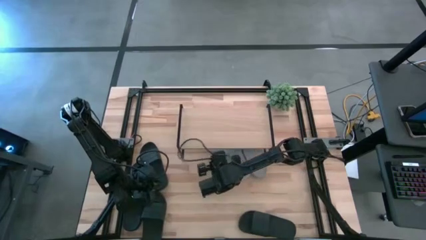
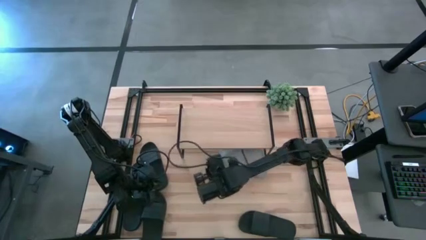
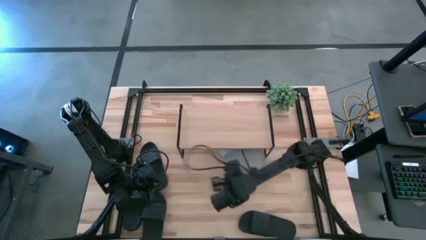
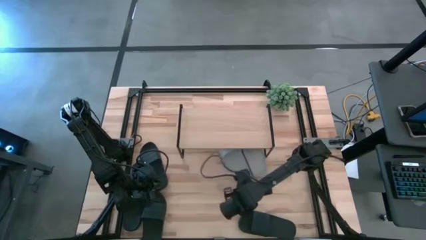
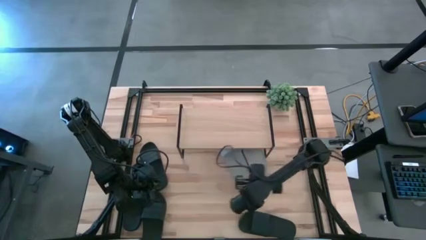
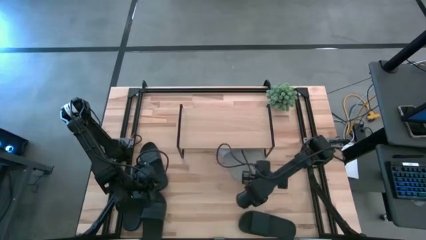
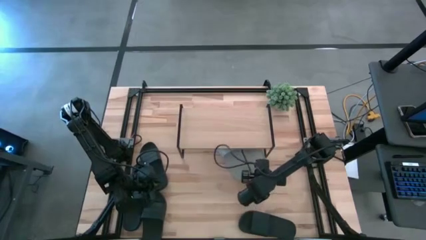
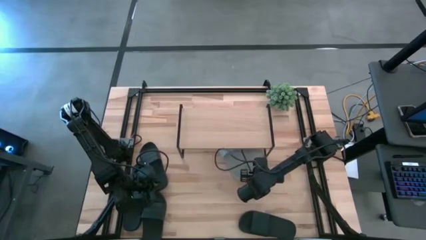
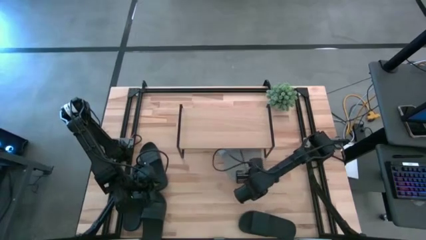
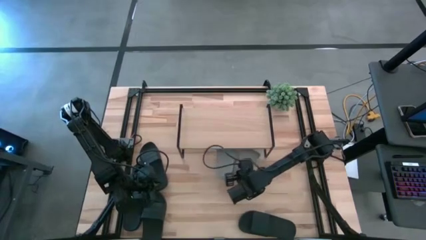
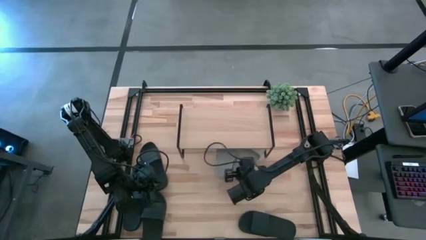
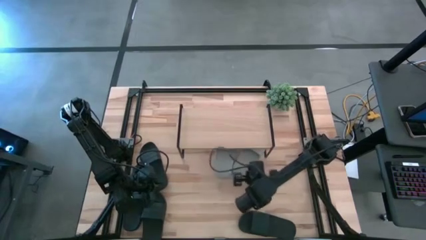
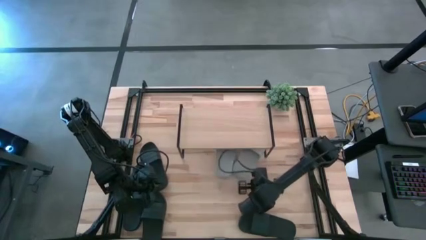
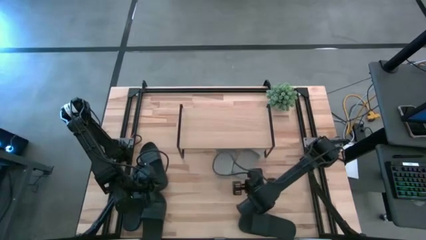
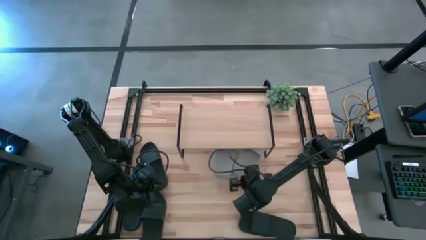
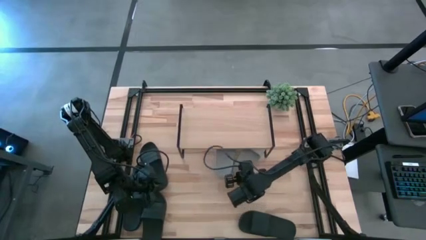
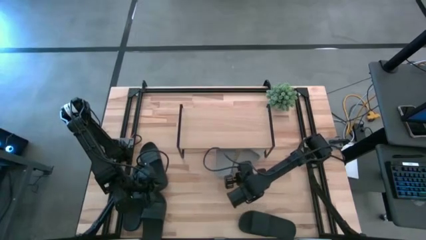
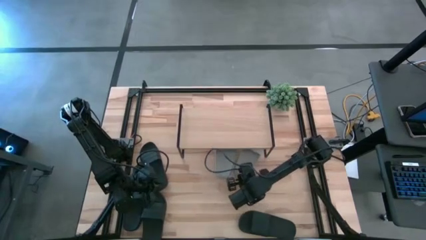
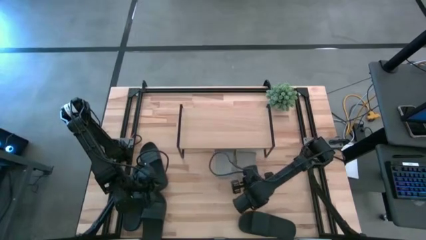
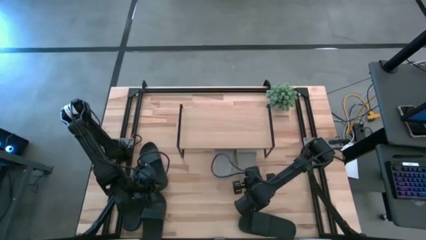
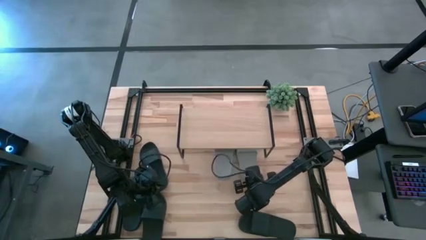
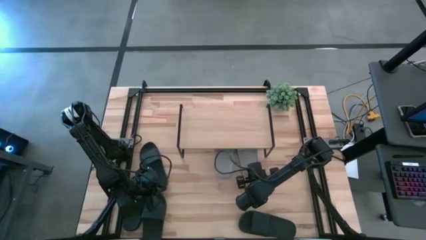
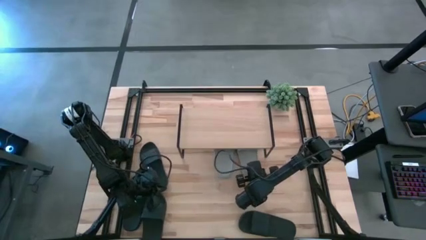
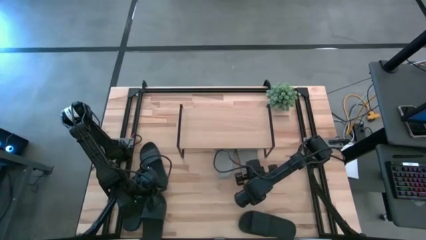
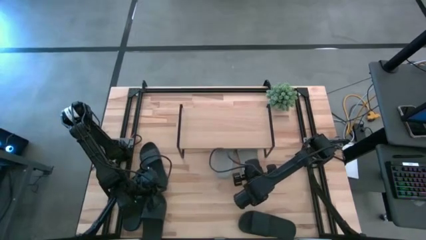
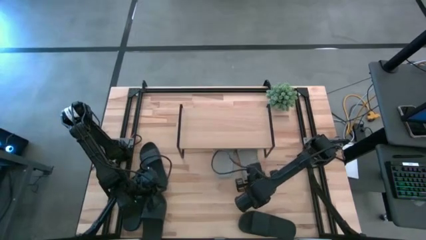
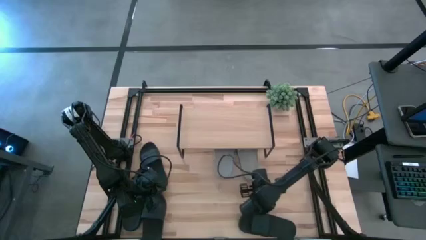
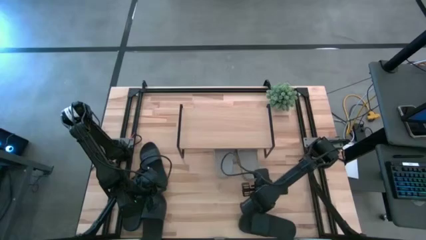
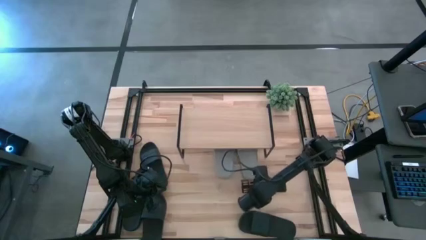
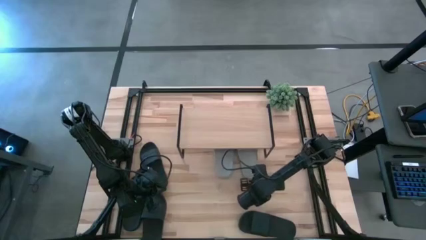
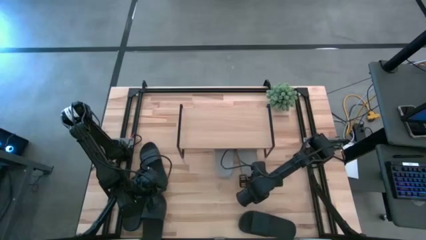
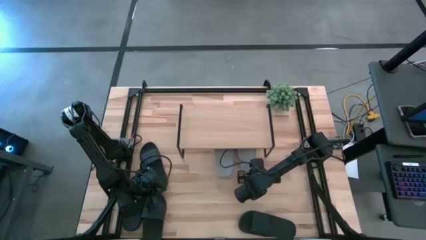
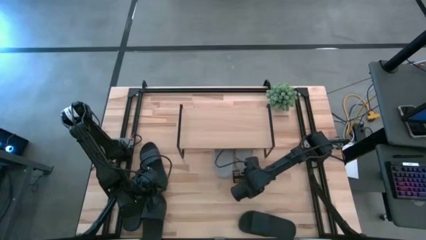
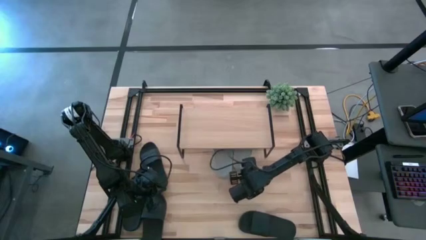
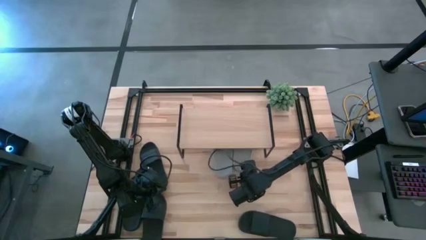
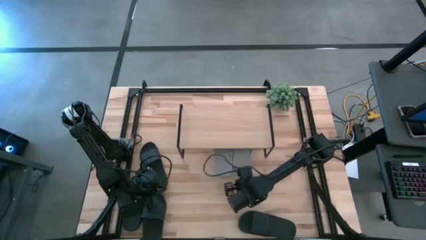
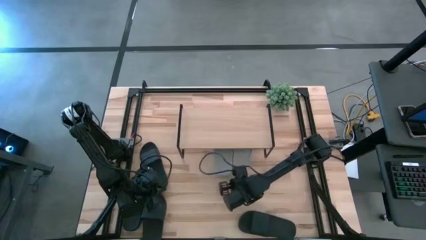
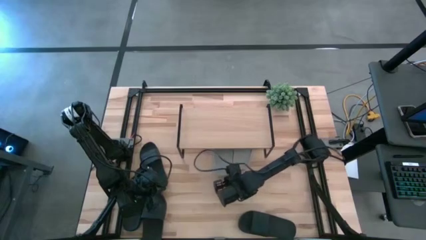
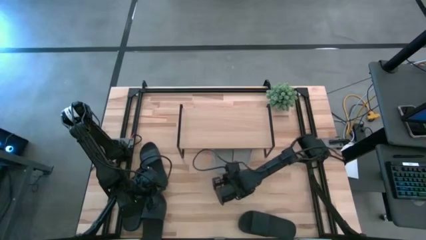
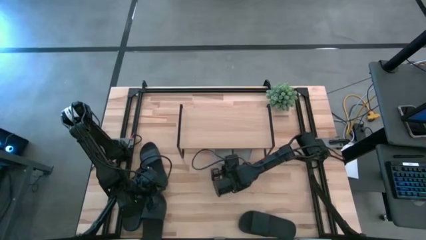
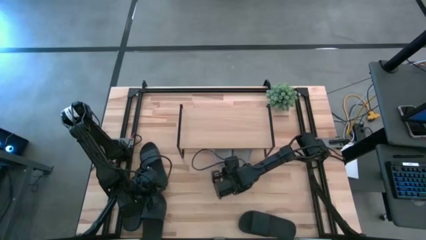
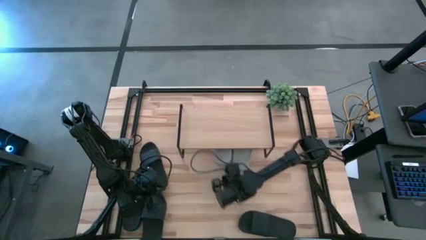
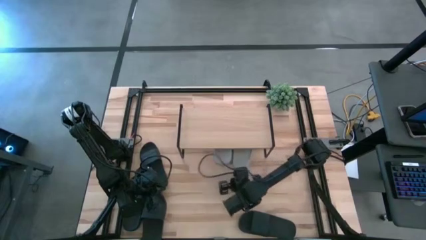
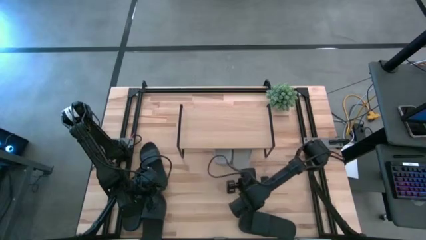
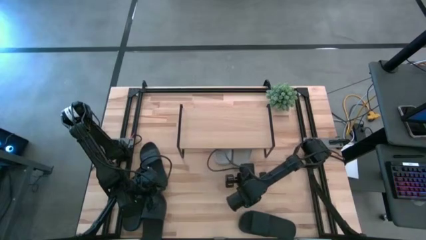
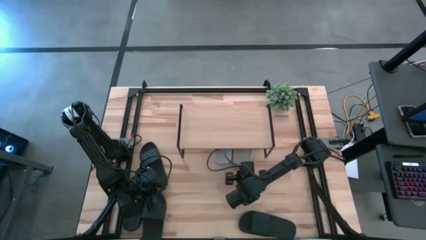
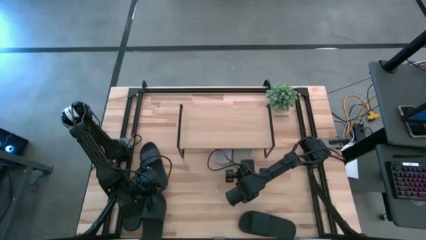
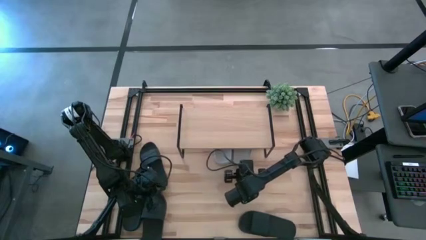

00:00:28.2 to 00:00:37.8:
Task: Pick and place slides into the shelf
Adjust the gray slippers under the shelf

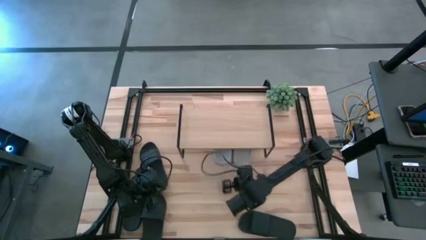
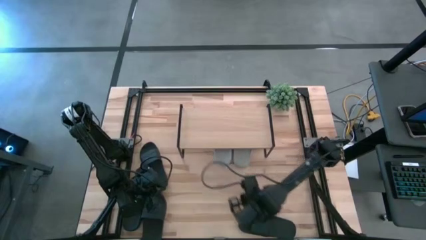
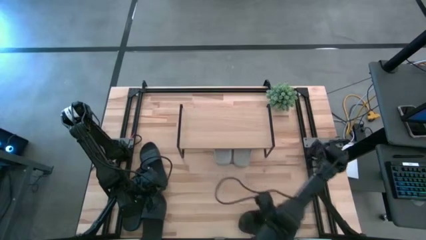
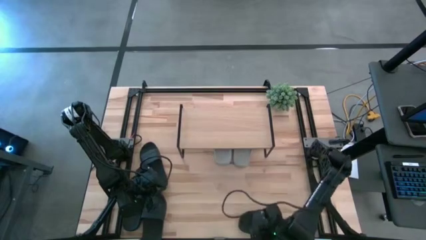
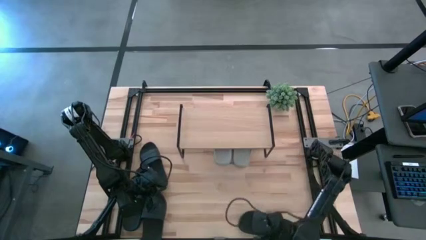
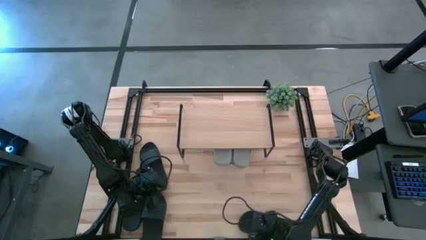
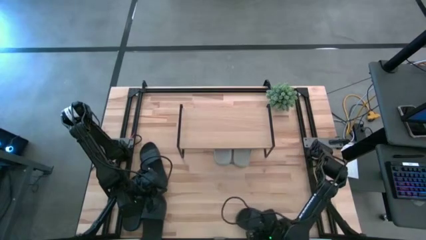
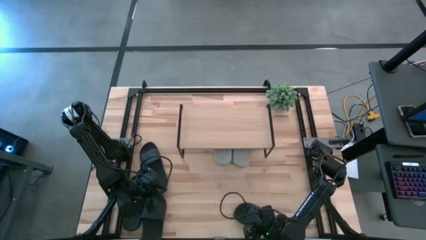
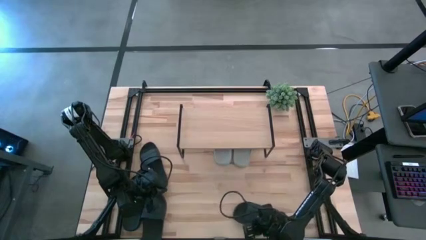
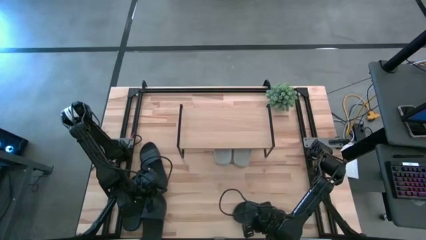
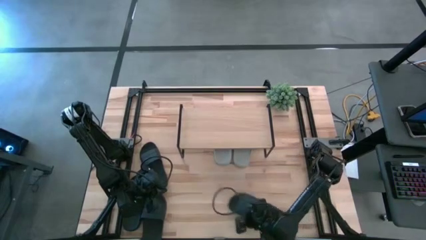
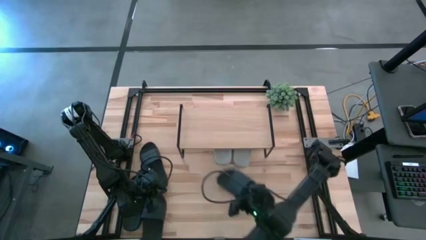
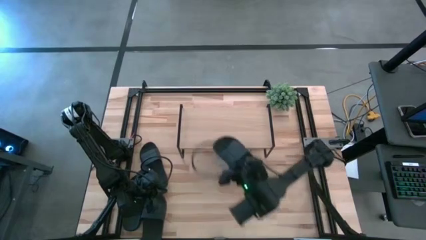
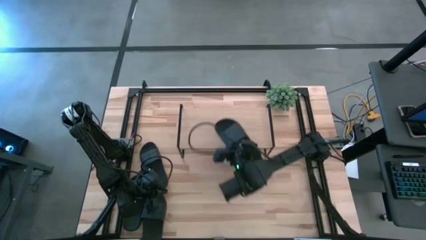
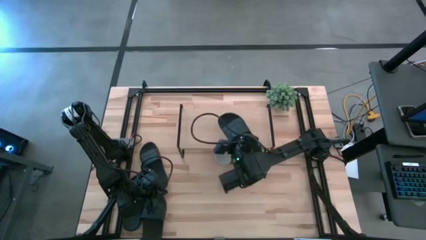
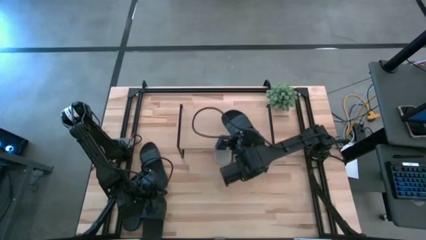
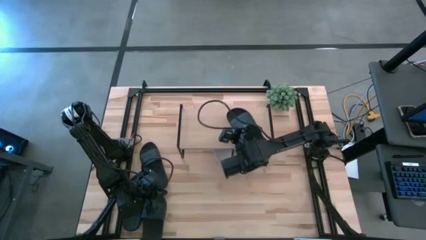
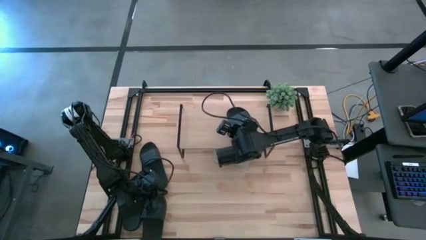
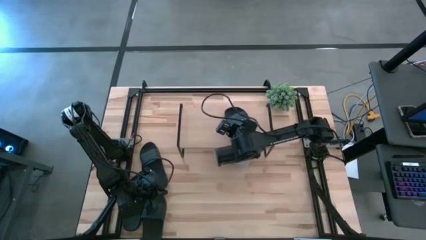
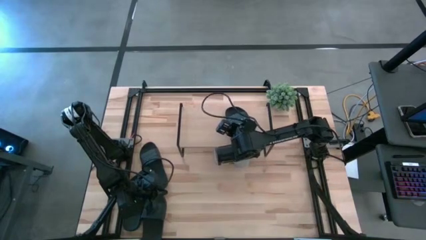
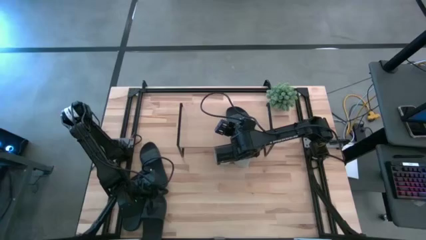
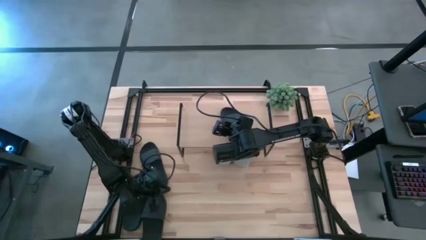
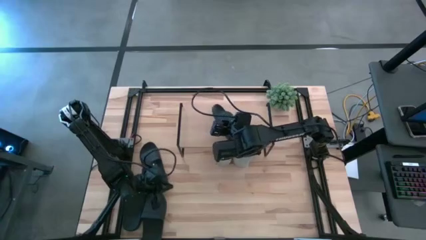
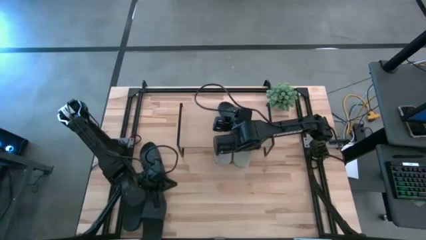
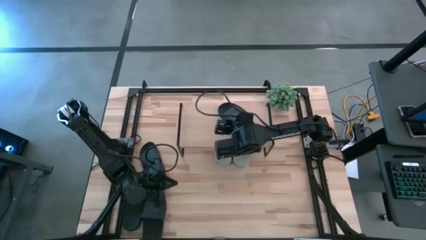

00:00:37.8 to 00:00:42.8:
Put the black slipper on the shelf
